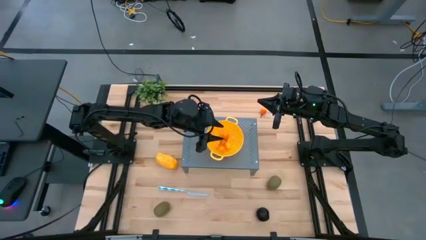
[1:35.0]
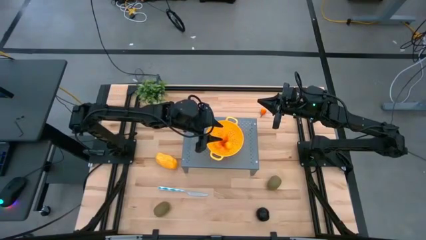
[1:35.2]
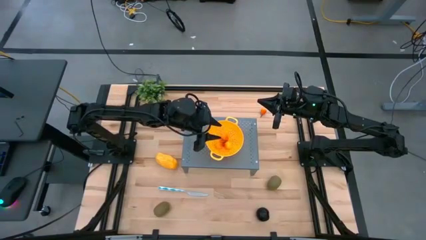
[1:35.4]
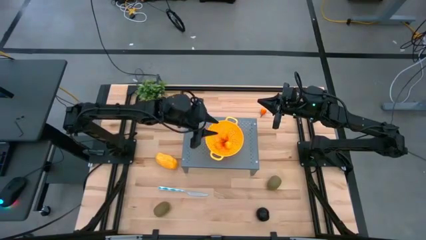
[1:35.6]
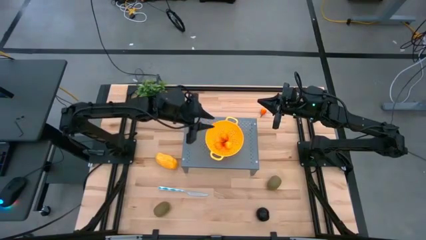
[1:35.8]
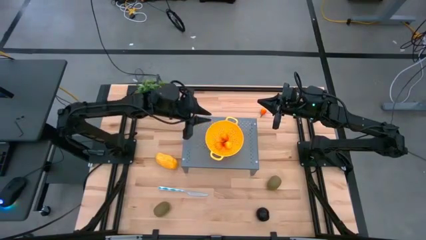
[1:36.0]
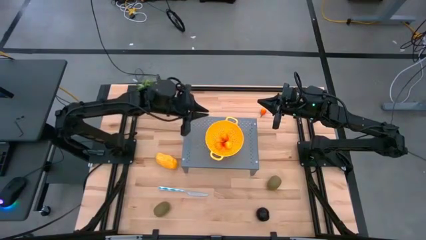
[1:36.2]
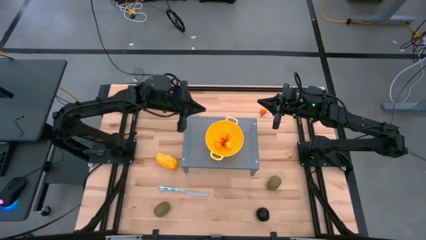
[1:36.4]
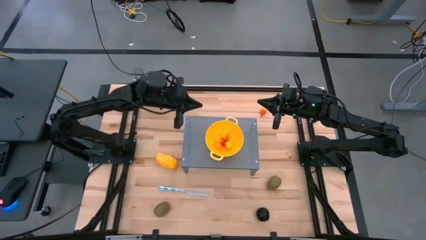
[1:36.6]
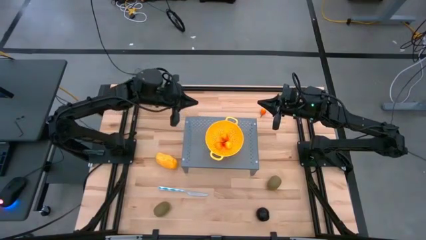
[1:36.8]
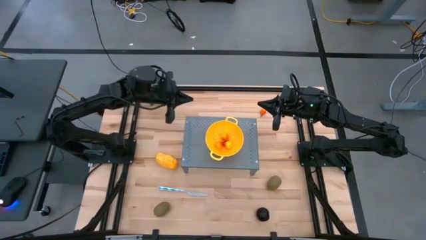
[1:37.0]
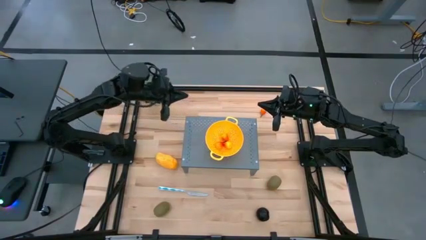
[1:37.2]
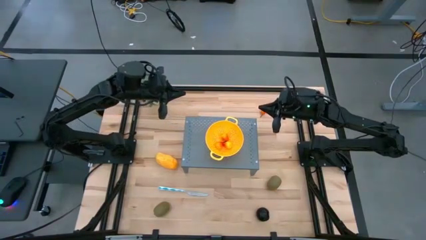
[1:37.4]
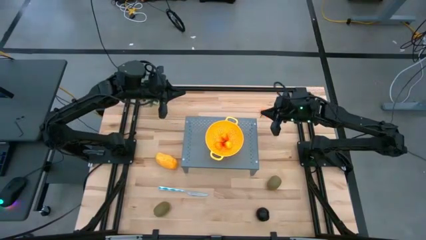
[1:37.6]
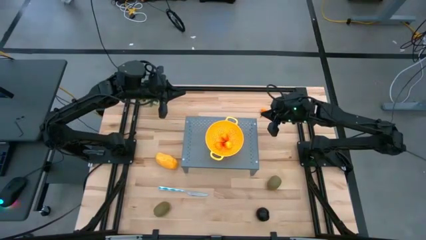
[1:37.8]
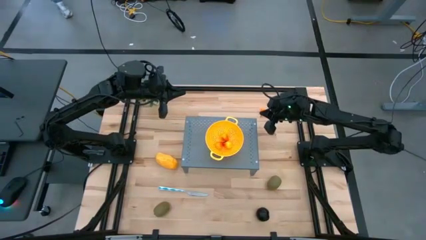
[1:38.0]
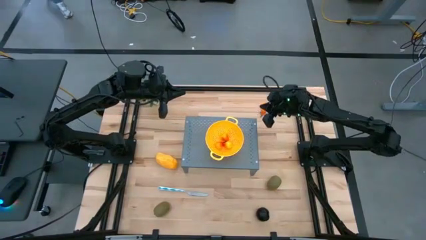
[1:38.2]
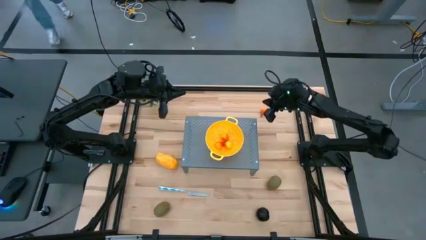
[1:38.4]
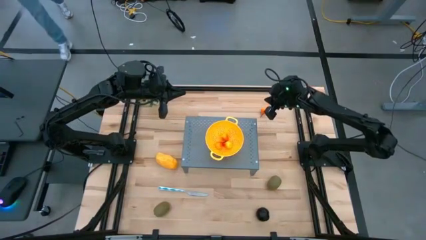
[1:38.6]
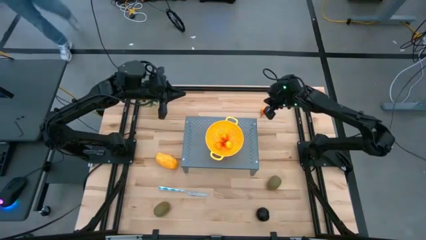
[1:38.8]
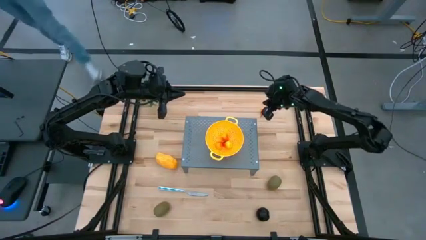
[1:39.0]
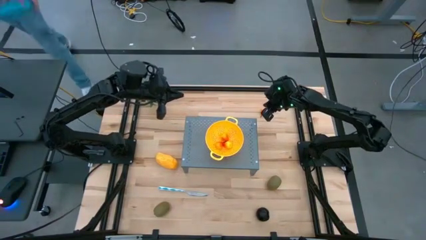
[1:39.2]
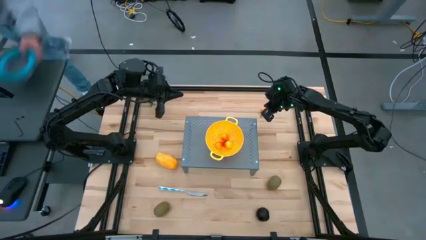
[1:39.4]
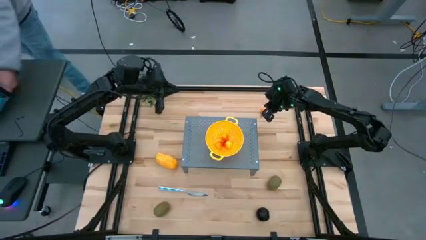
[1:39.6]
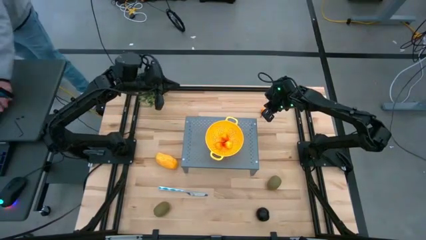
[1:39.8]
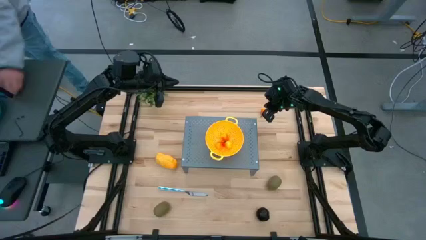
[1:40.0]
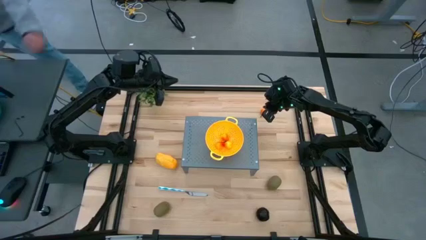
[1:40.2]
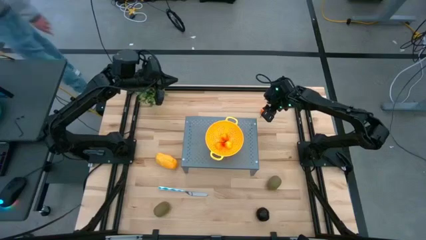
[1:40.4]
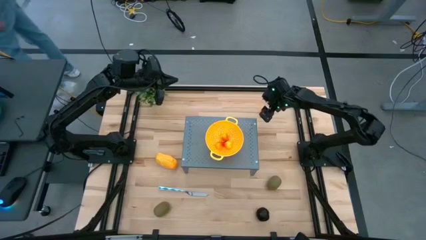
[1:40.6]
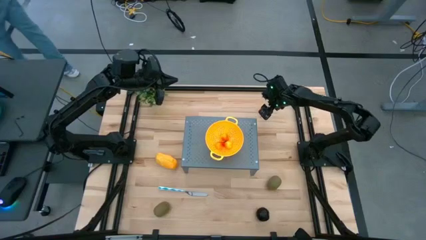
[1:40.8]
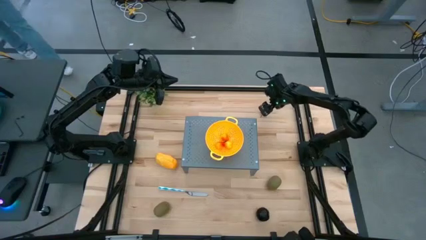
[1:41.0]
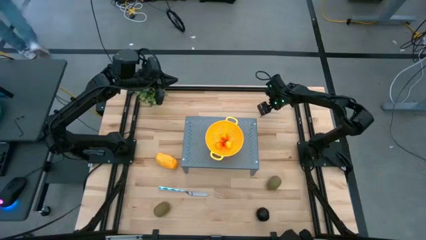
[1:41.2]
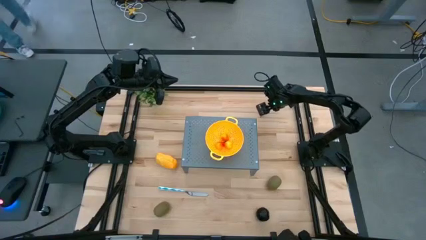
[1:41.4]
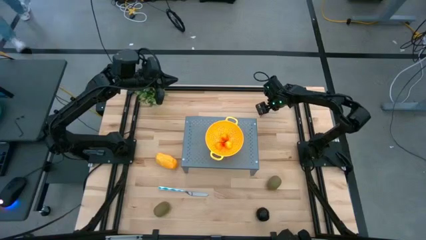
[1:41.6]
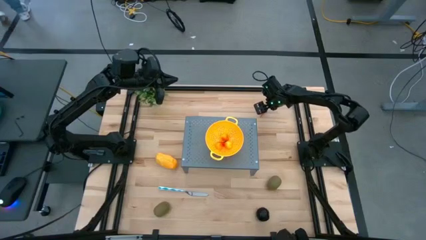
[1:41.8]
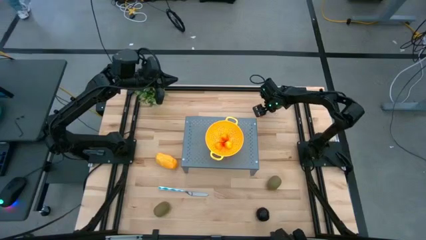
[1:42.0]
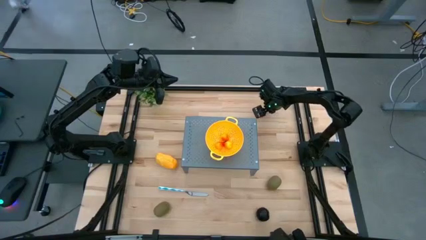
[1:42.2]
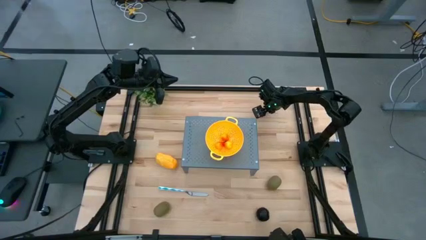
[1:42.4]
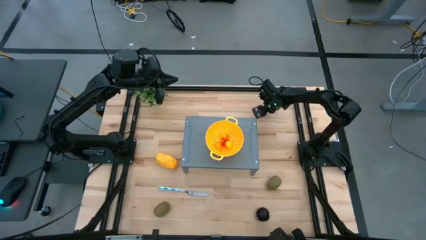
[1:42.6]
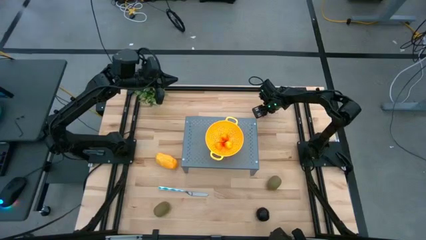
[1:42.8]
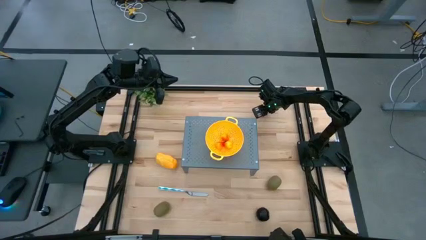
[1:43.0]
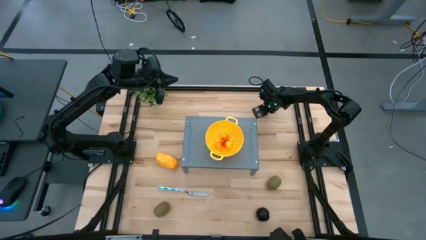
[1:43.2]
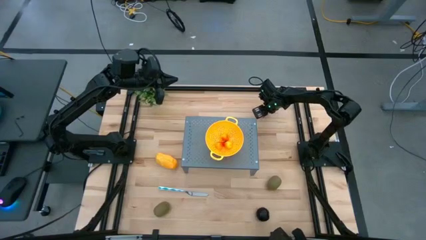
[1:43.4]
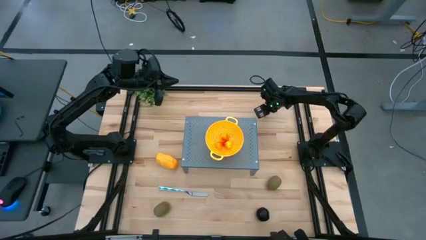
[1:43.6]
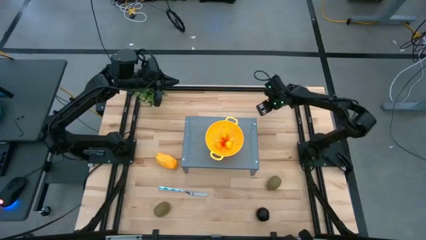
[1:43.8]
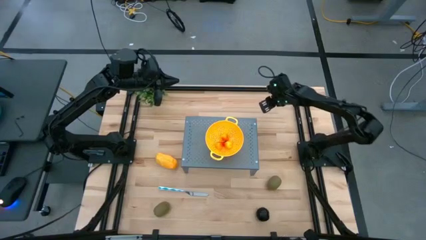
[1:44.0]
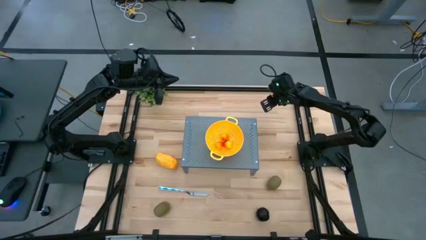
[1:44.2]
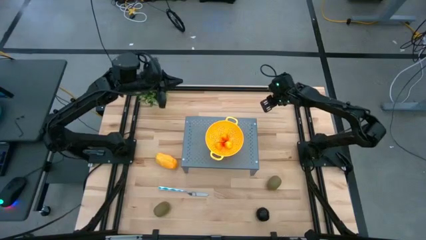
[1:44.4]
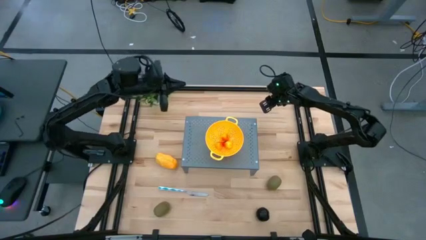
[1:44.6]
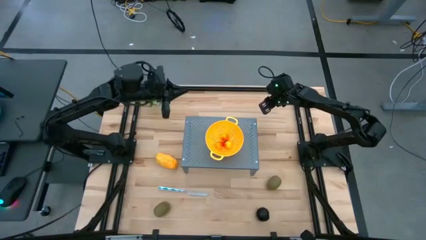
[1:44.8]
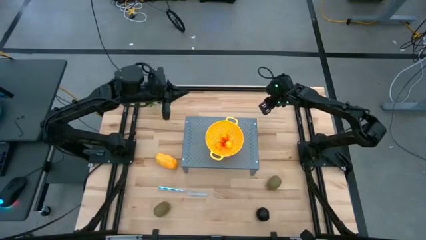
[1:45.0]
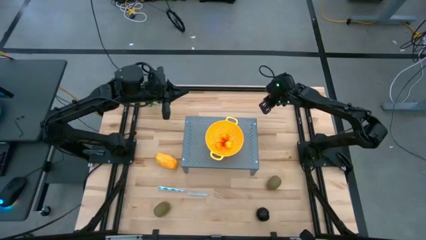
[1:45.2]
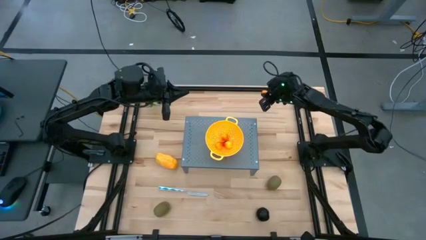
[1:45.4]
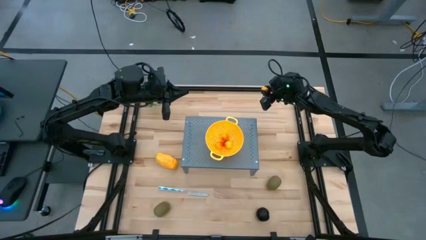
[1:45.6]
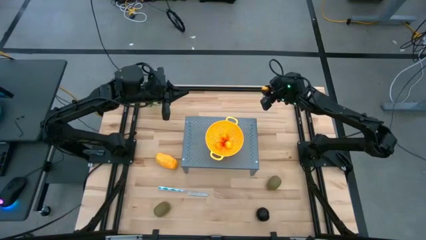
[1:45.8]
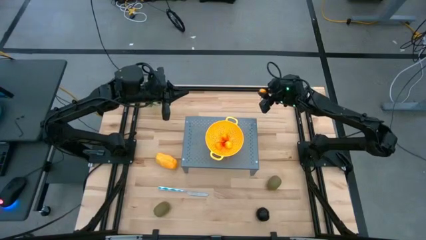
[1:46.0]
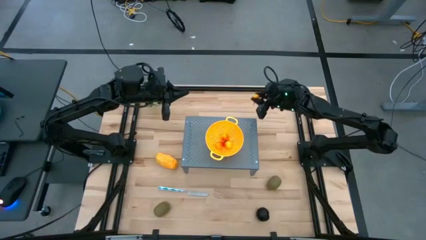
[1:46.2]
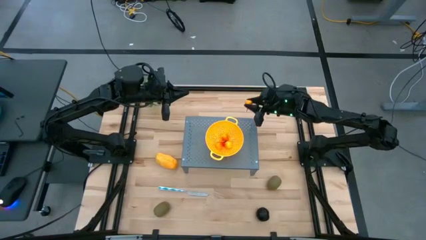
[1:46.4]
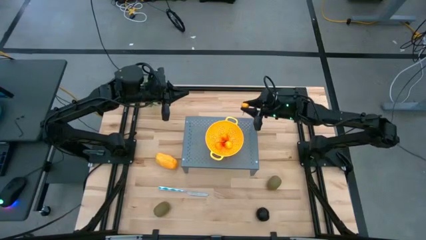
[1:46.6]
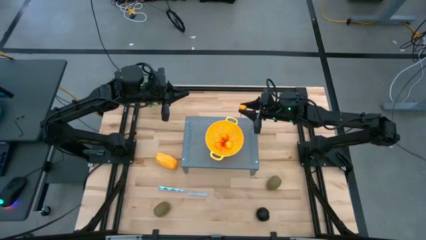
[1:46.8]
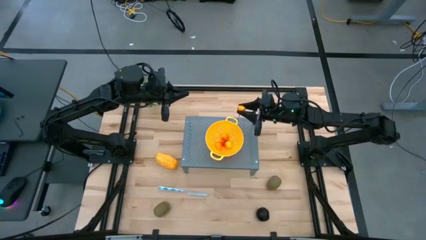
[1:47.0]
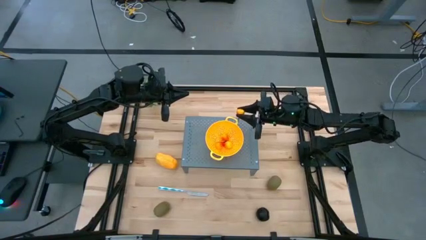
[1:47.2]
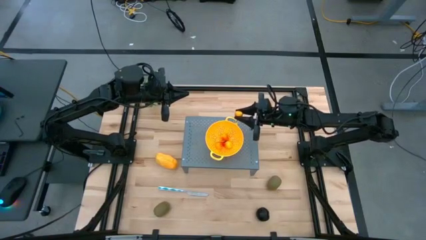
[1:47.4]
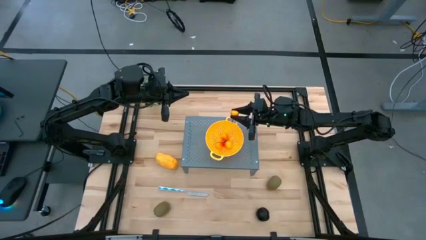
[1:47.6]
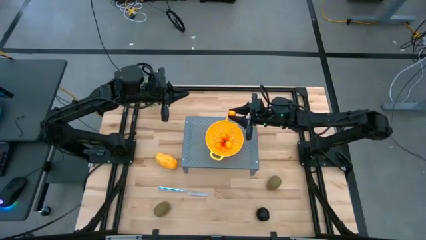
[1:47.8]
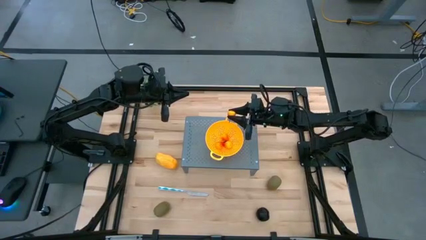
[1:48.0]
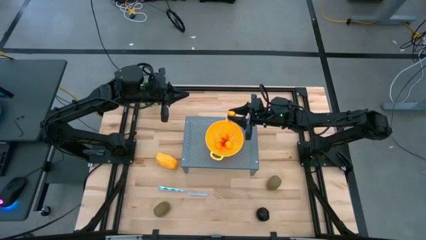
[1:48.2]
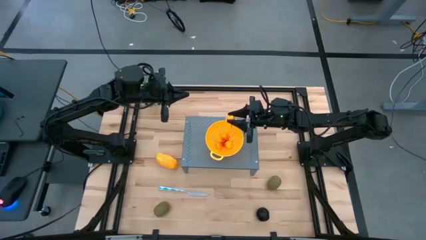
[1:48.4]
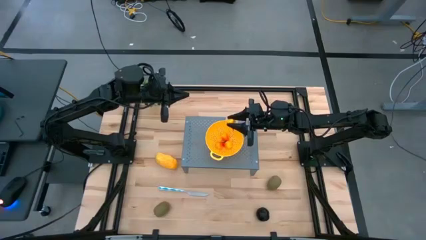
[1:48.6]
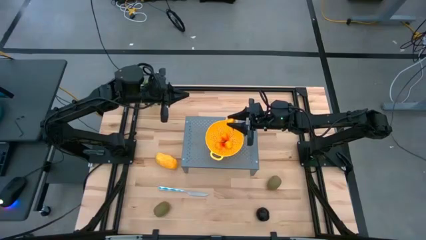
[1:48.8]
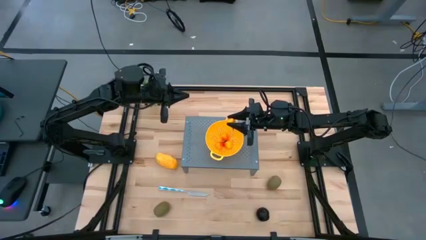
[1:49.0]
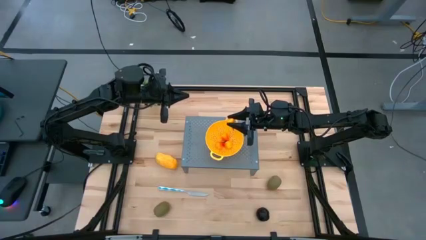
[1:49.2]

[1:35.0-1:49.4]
Task: Pick & Place Fruit
Put the pear into the strainer bowl on the shelf

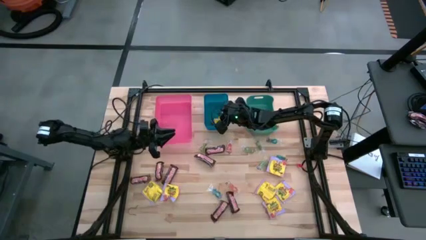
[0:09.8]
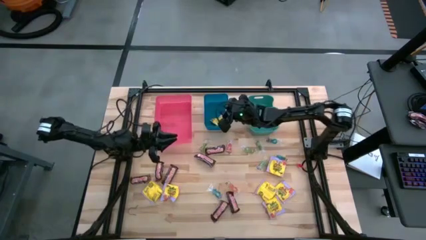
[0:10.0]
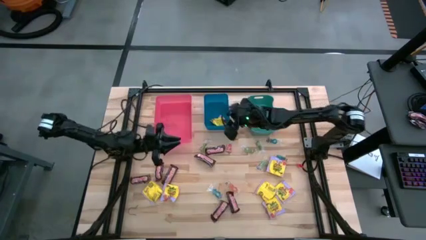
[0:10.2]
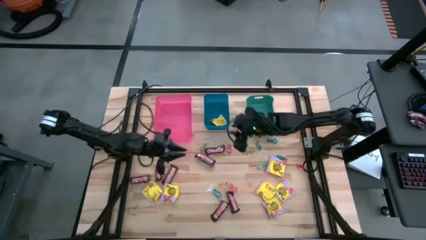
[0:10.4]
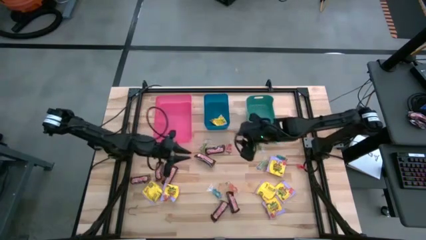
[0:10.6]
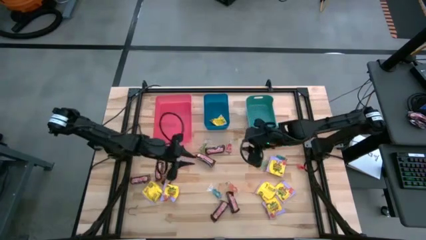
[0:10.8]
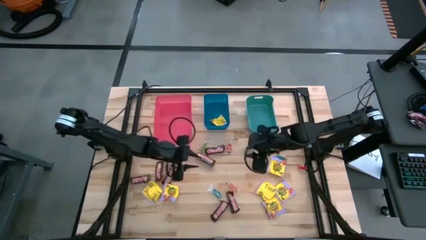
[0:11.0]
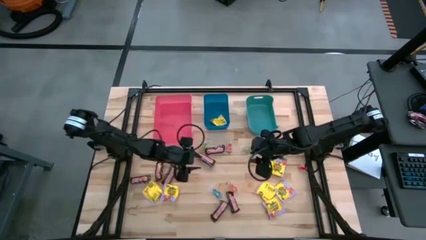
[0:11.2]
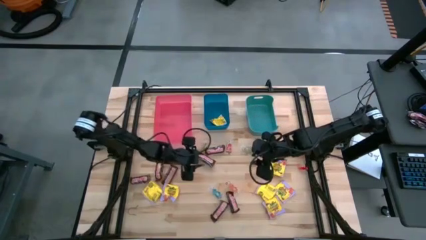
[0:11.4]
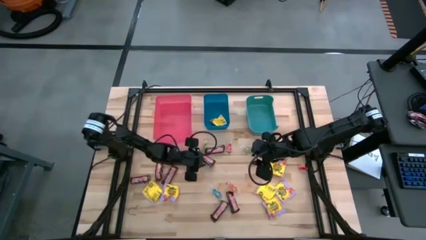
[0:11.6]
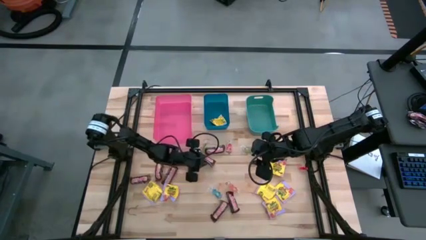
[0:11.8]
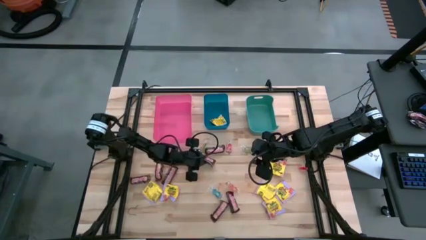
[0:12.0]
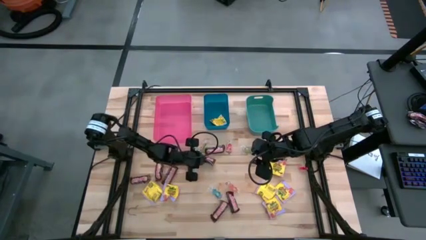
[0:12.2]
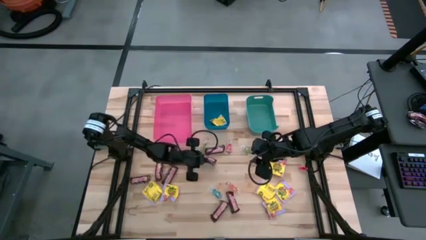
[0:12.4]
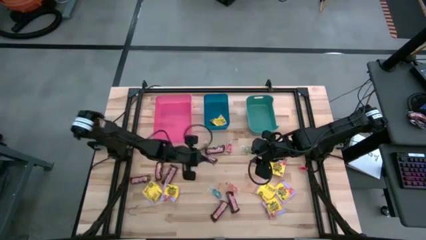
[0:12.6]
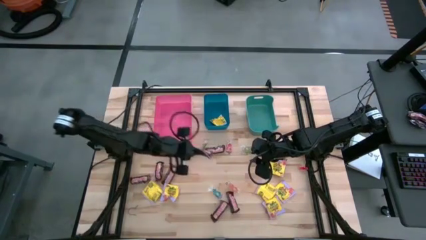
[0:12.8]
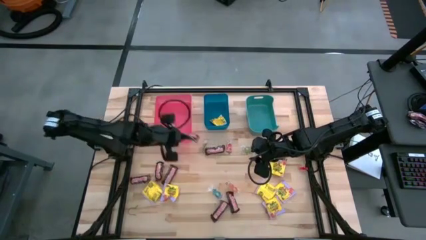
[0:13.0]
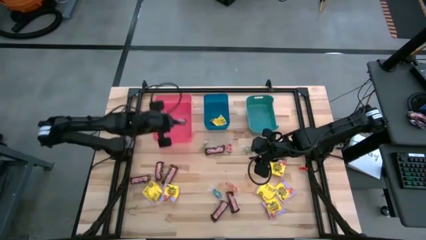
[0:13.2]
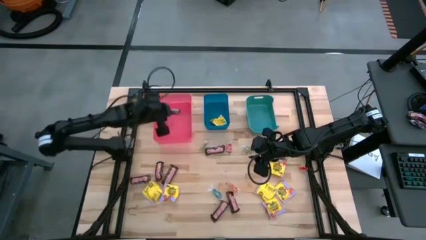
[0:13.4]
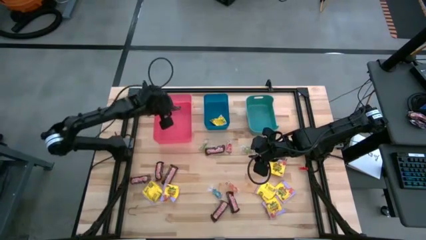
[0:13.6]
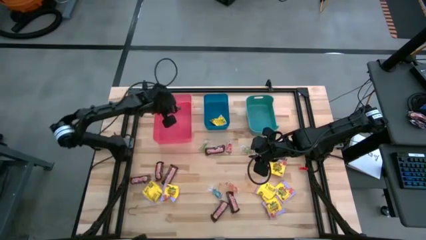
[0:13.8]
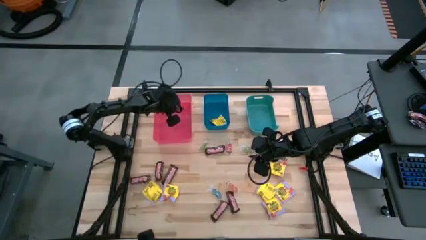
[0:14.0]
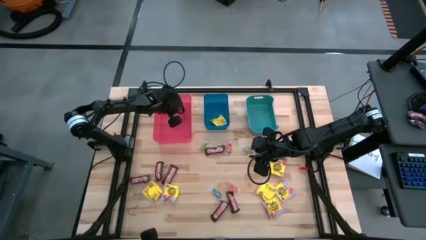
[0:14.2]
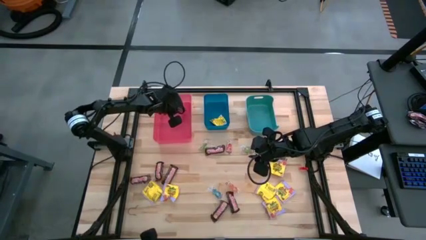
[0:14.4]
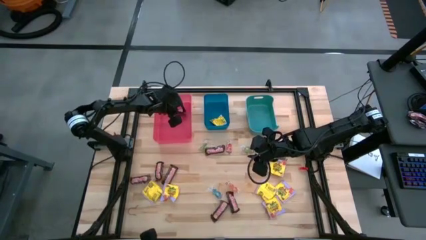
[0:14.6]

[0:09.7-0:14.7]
Task: Sort candy
Put the chocolate bar into the red bin
